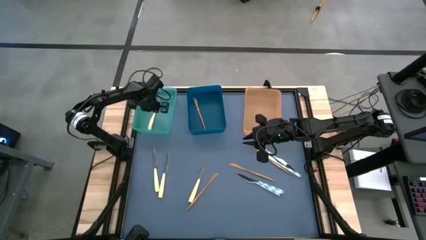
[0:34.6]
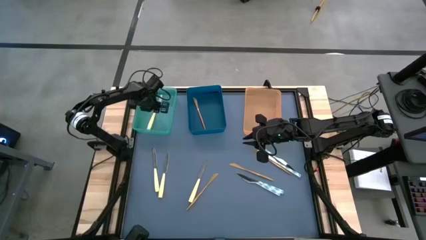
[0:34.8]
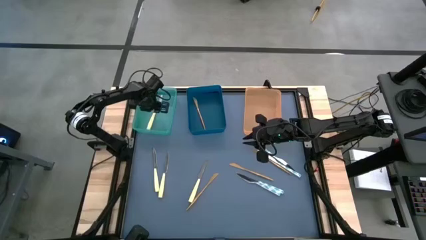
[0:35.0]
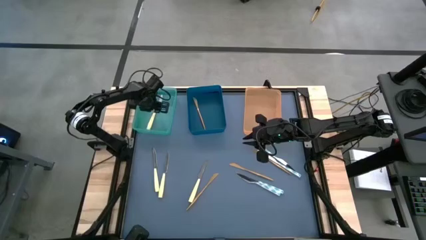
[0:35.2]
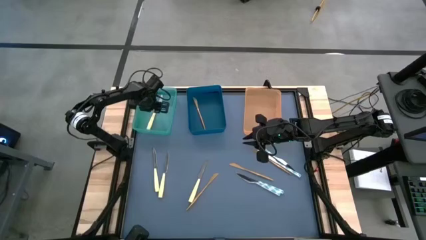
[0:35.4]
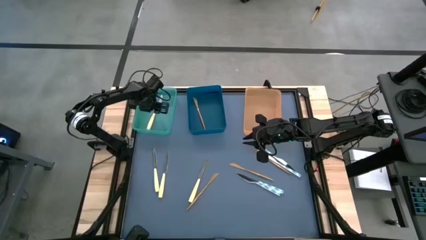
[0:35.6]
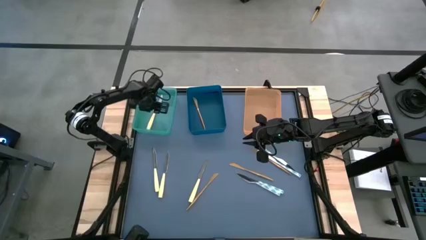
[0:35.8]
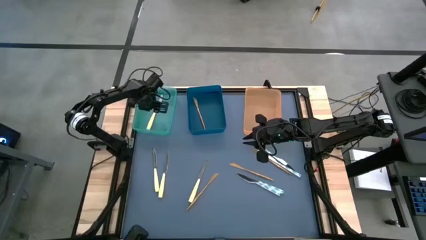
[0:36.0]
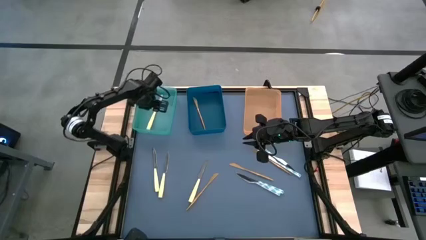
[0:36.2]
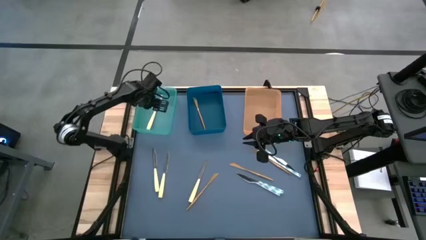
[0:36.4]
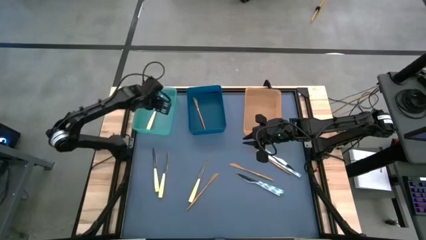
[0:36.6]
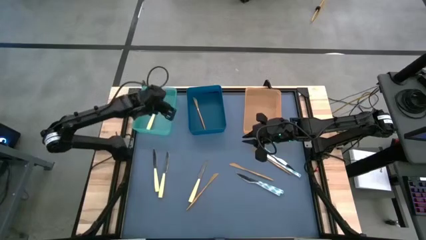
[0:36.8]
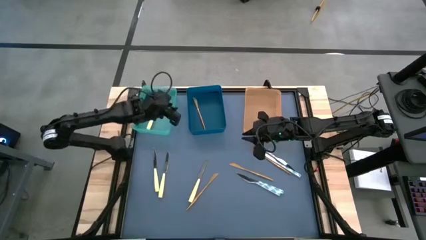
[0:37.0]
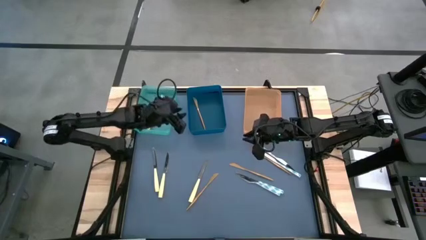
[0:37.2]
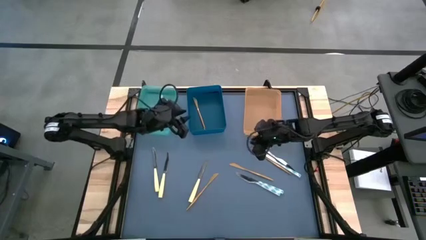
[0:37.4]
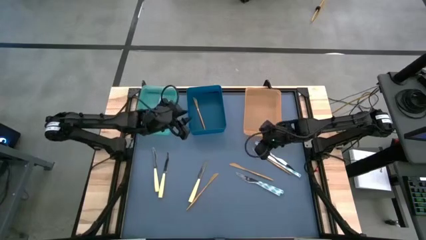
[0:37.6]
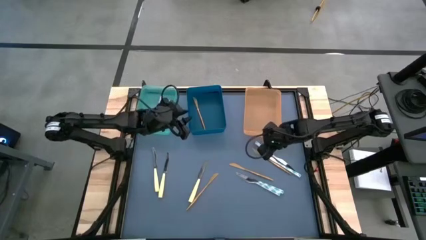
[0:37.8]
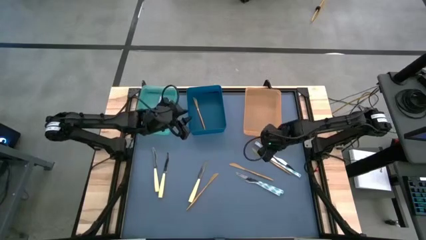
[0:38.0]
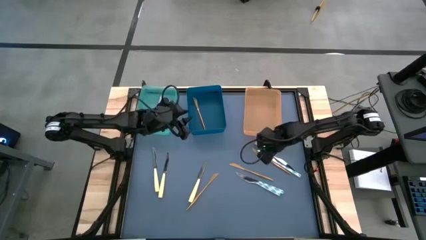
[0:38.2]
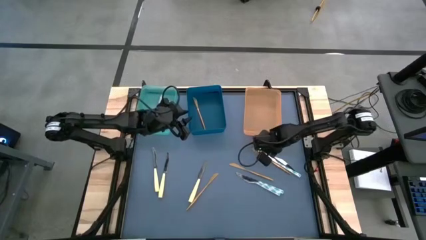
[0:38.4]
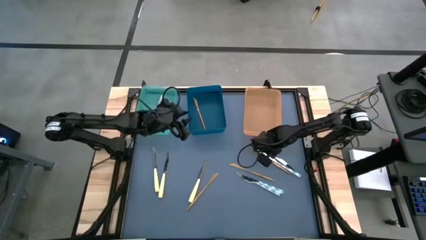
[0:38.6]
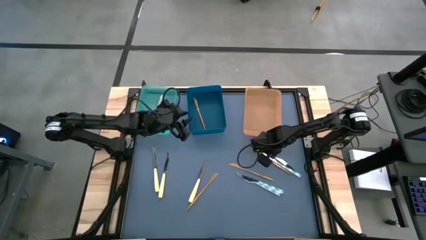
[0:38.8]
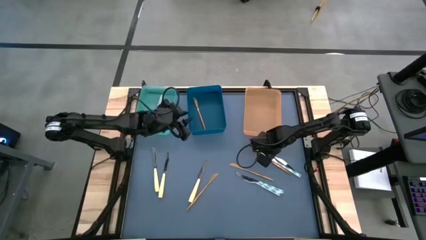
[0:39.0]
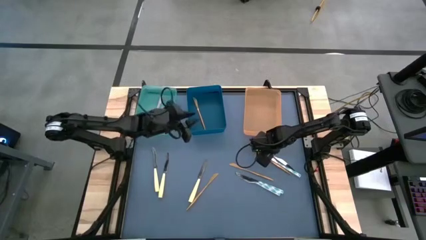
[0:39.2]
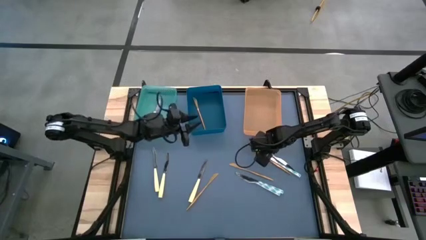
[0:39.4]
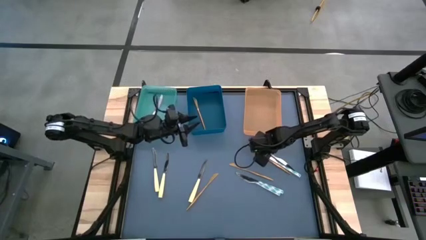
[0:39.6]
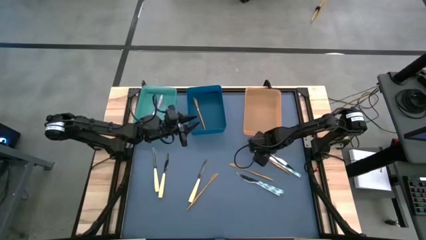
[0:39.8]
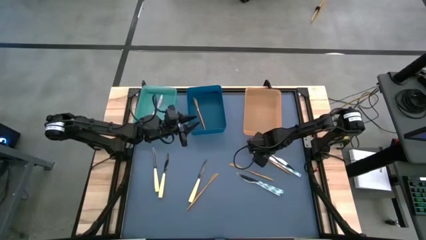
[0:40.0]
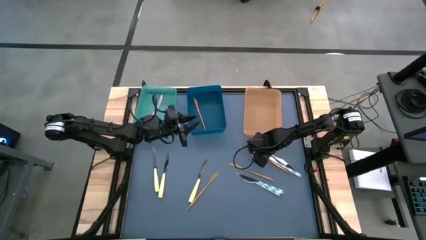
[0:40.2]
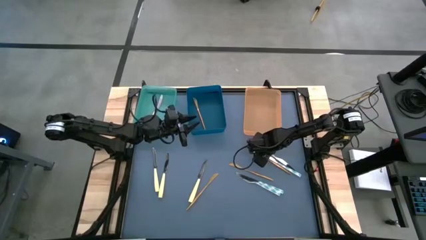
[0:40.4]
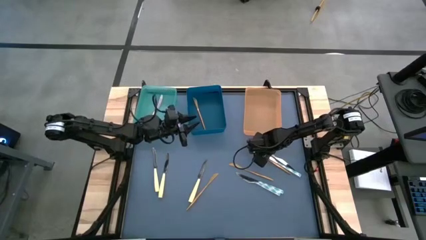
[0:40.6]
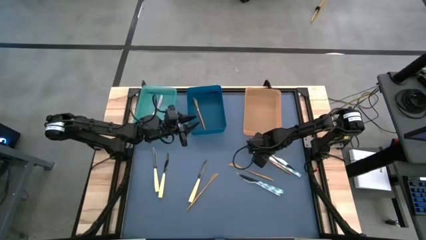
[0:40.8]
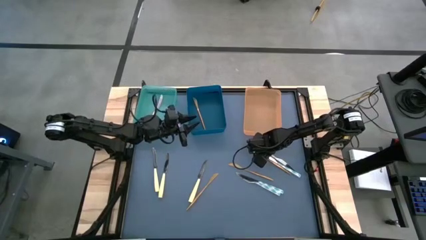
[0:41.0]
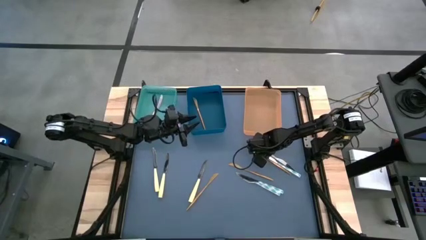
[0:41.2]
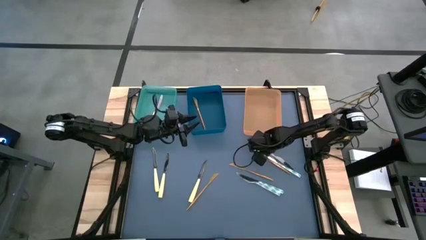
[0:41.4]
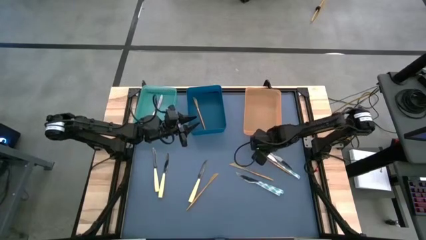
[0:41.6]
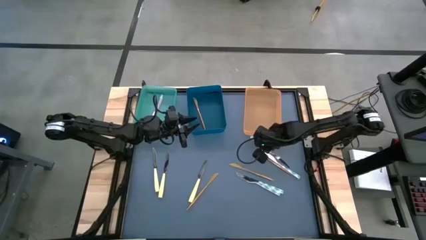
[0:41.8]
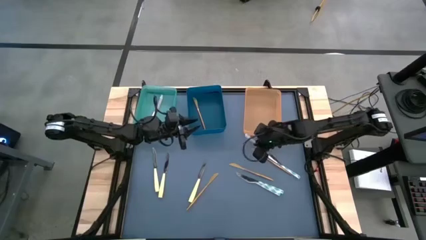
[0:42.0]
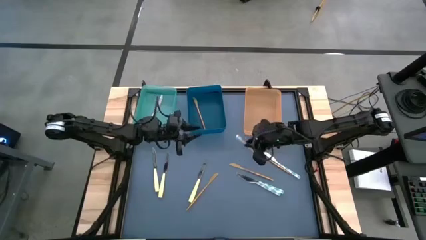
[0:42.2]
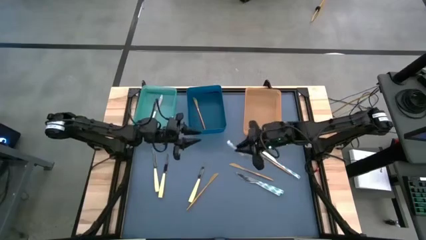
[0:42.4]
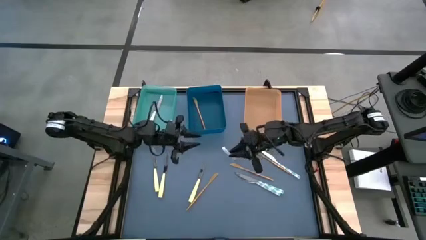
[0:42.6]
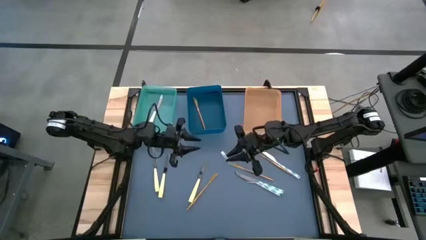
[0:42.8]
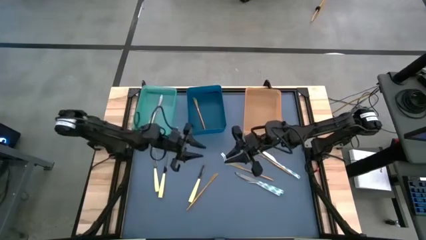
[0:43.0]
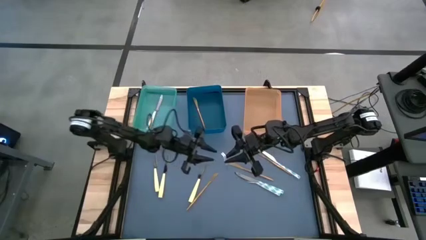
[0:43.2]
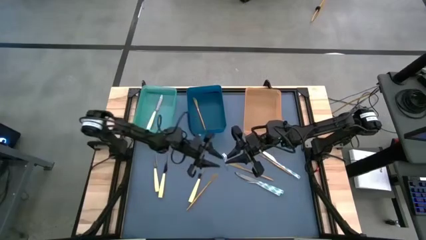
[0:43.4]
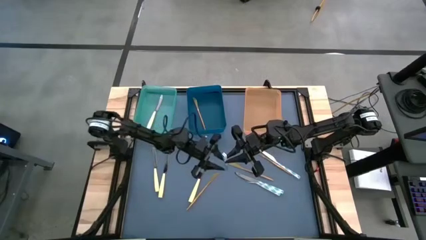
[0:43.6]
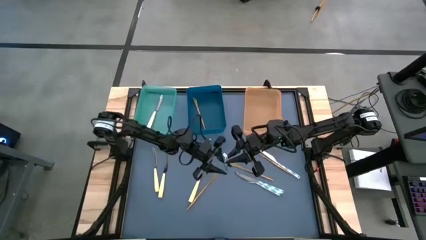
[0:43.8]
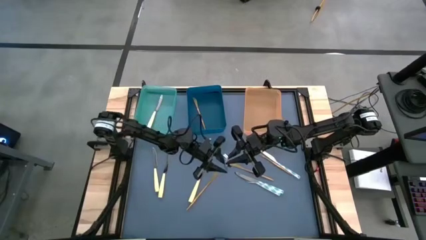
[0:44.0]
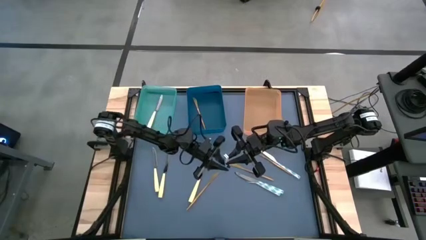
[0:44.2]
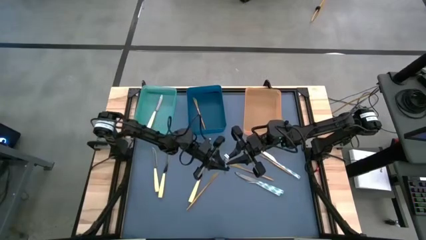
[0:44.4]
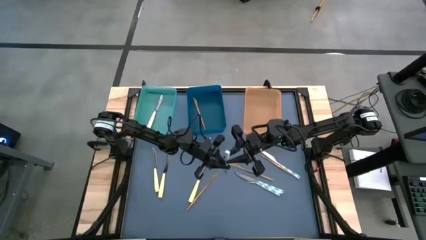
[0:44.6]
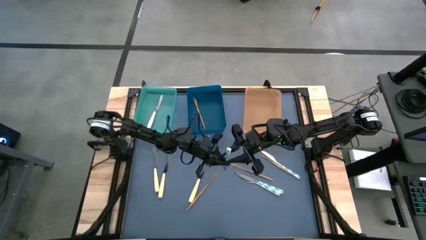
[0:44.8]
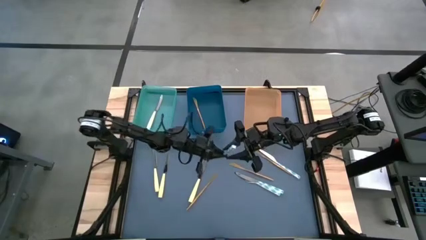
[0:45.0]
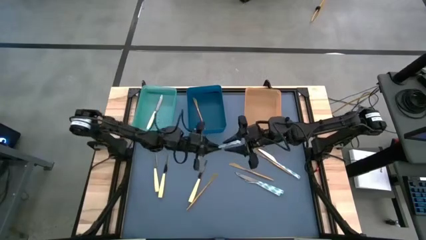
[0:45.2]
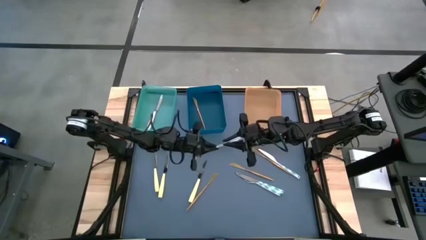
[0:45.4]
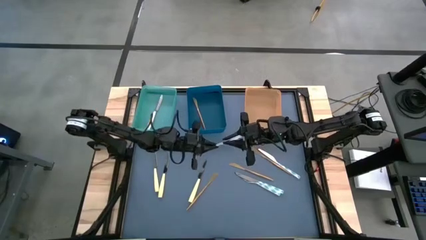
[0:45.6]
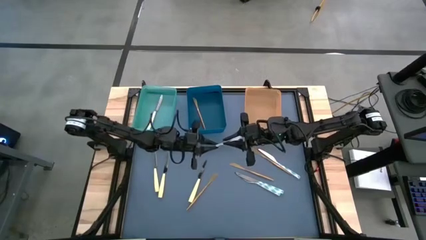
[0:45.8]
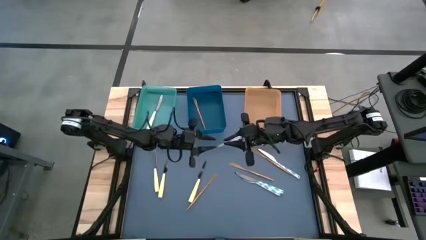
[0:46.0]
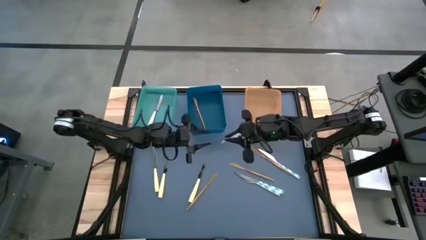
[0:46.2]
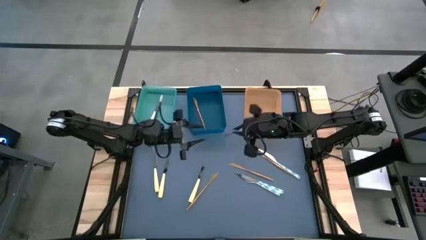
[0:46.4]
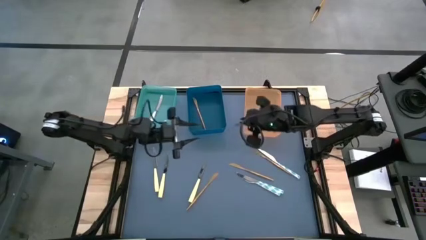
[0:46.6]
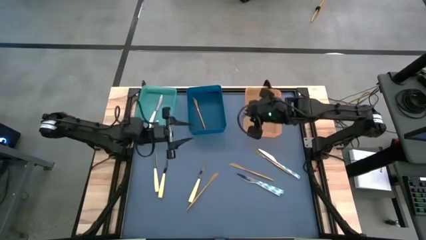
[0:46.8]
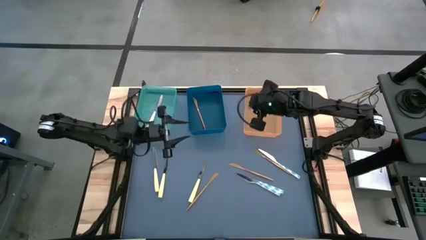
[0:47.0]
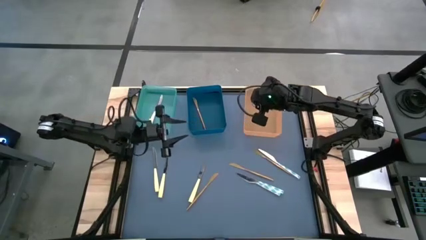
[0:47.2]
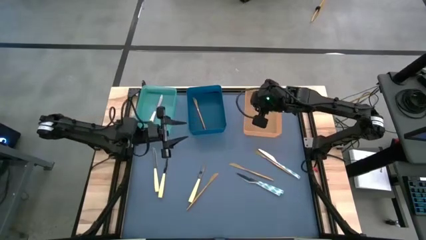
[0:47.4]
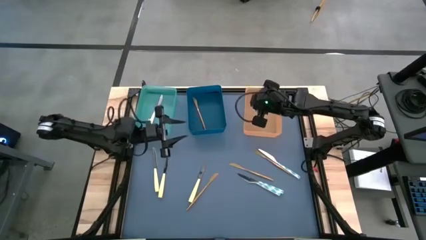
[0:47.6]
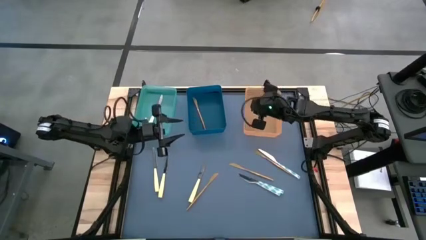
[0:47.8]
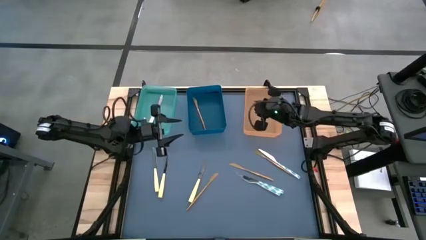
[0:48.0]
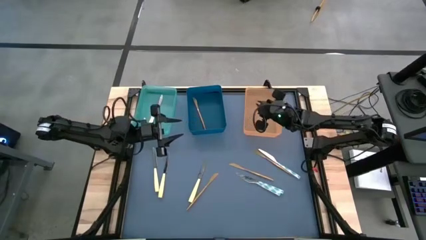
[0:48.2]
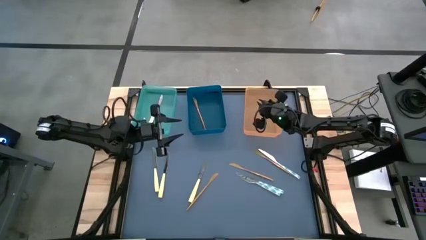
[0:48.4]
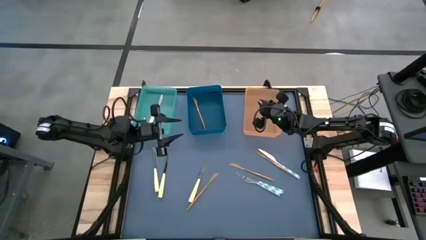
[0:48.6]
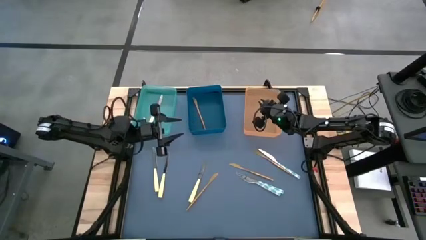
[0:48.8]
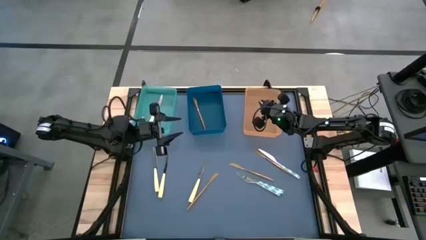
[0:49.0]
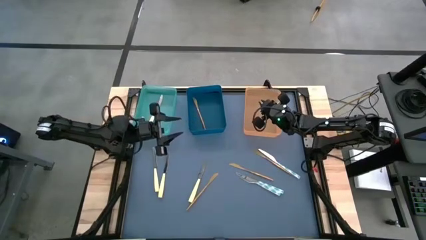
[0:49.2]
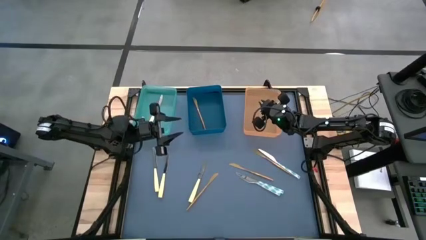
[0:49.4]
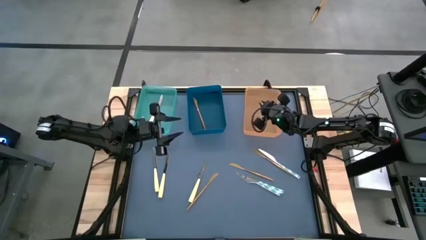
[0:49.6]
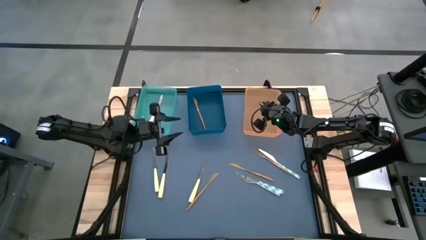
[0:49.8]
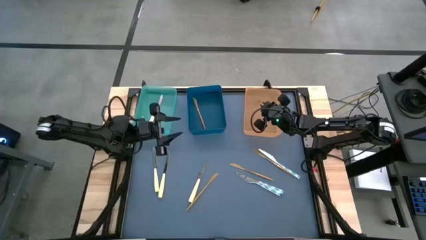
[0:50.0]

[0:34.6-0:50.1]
Task: Sort silverware by color (type)
Put the white patterned table knife into the orange bin
